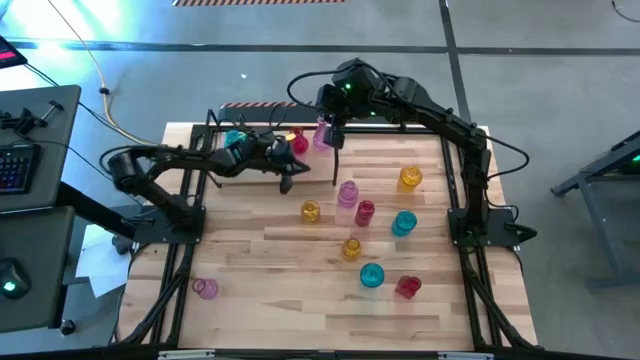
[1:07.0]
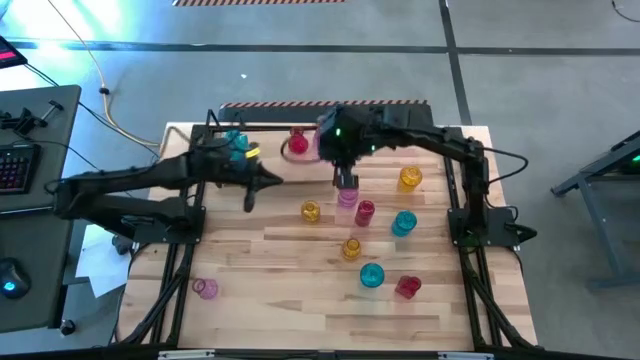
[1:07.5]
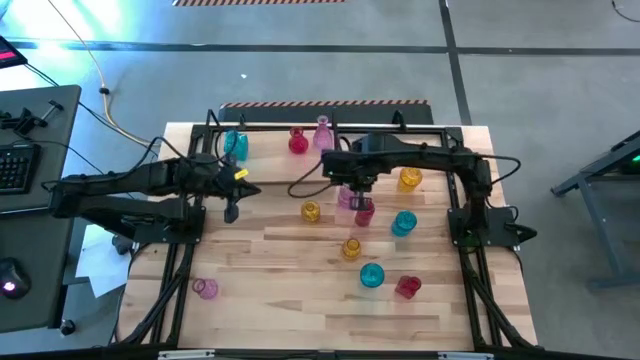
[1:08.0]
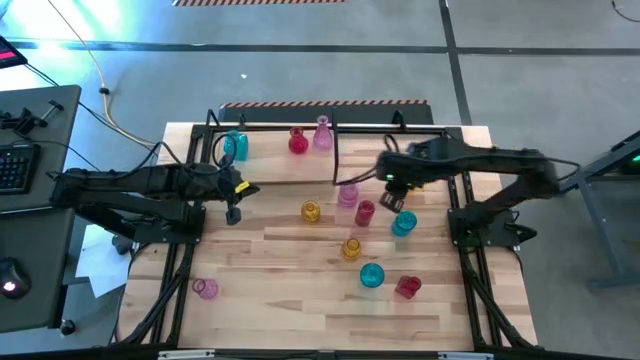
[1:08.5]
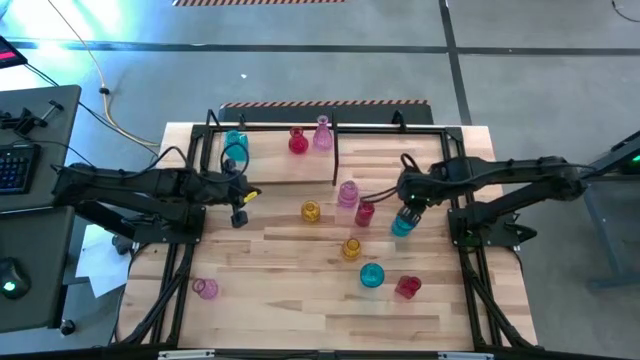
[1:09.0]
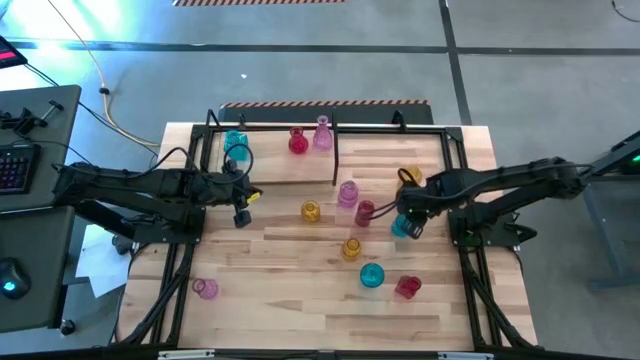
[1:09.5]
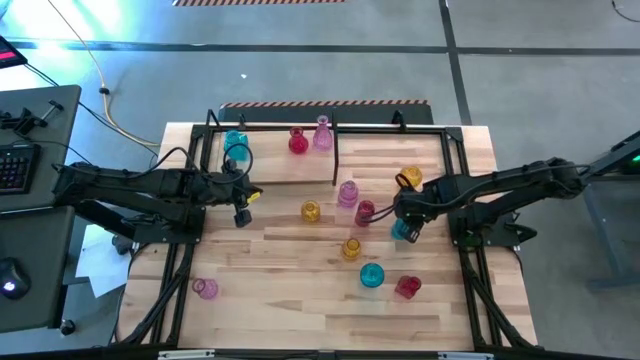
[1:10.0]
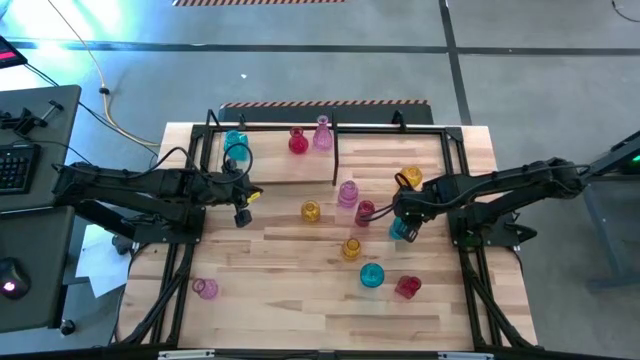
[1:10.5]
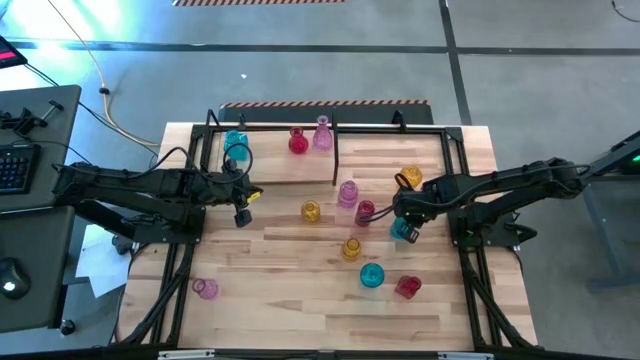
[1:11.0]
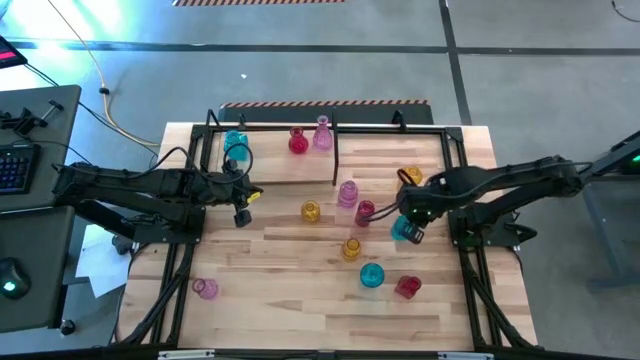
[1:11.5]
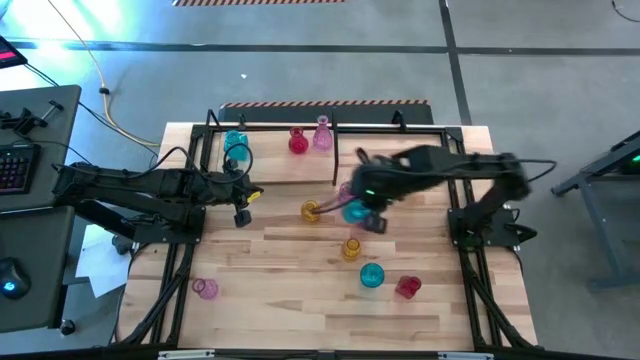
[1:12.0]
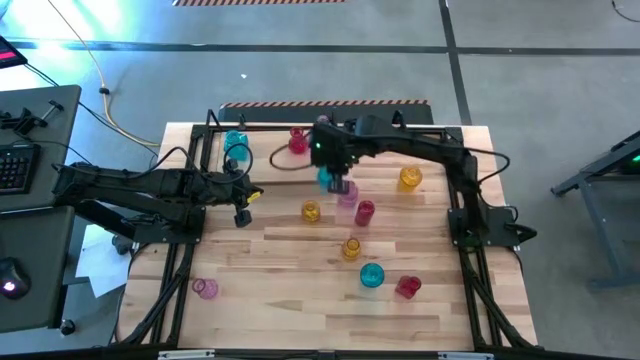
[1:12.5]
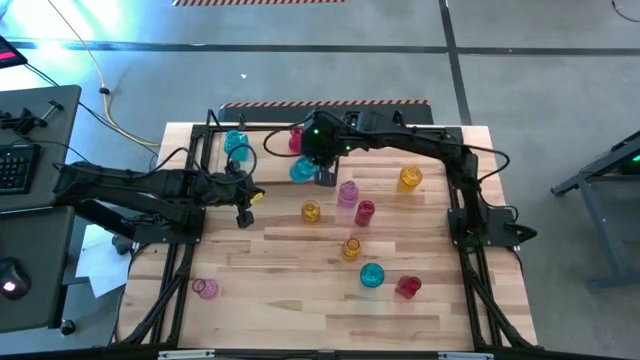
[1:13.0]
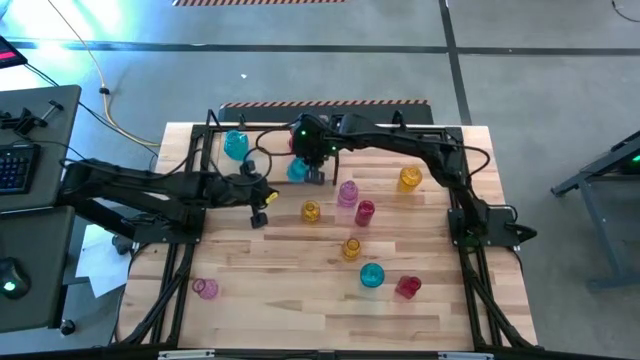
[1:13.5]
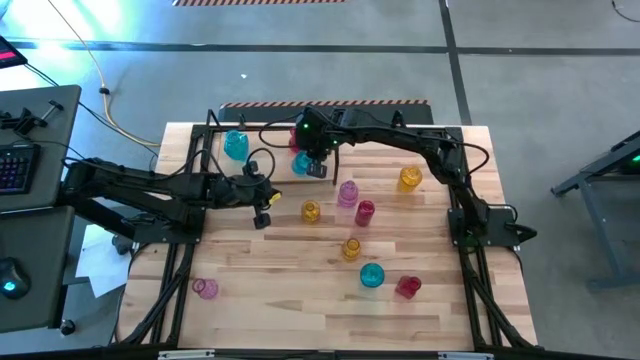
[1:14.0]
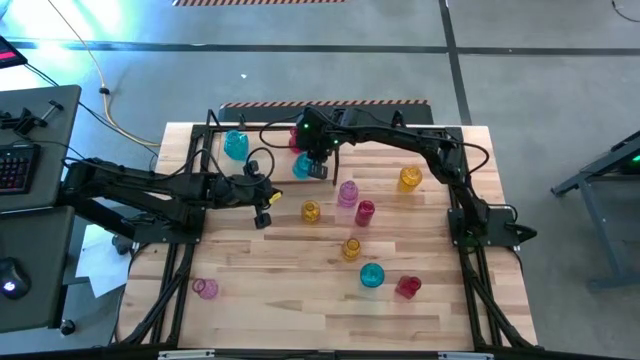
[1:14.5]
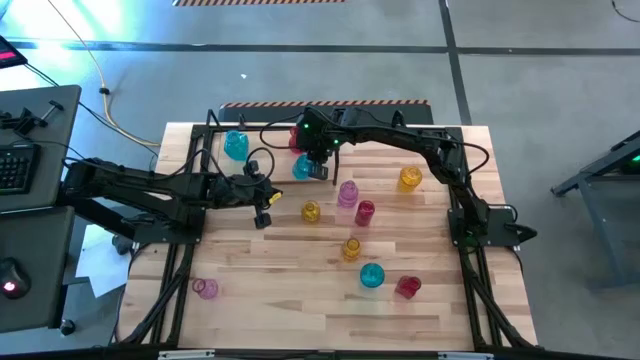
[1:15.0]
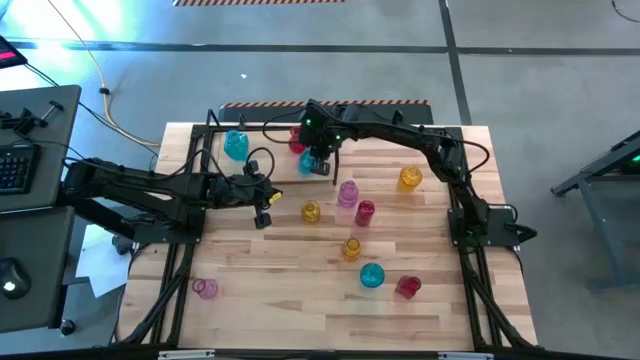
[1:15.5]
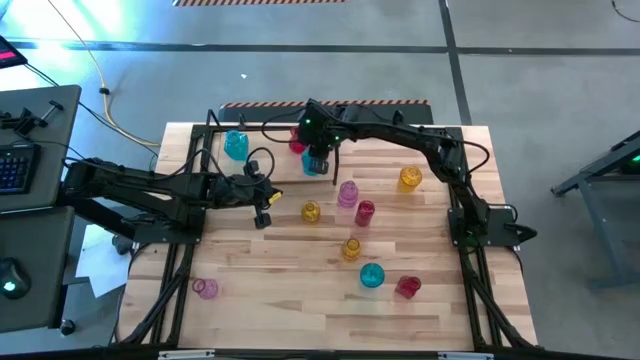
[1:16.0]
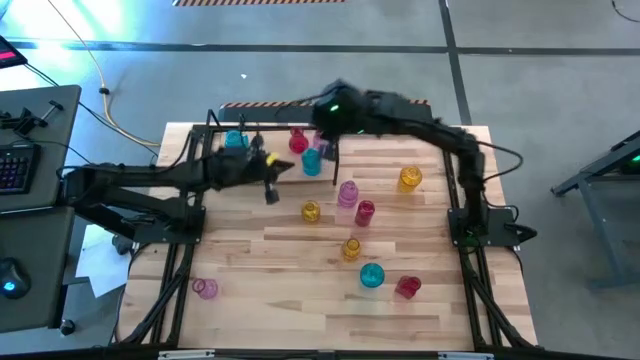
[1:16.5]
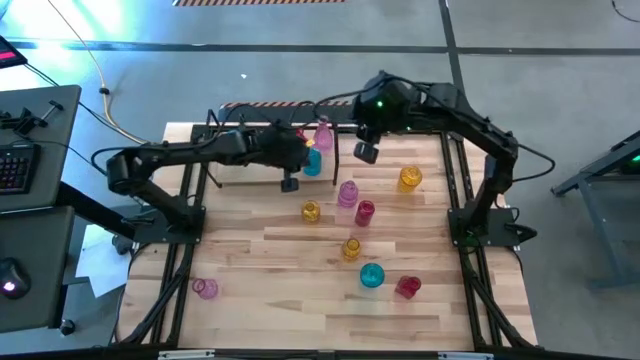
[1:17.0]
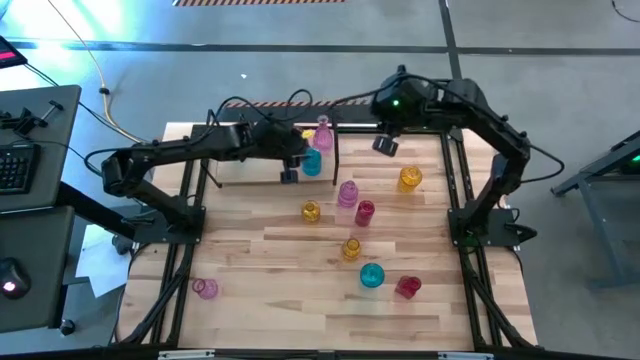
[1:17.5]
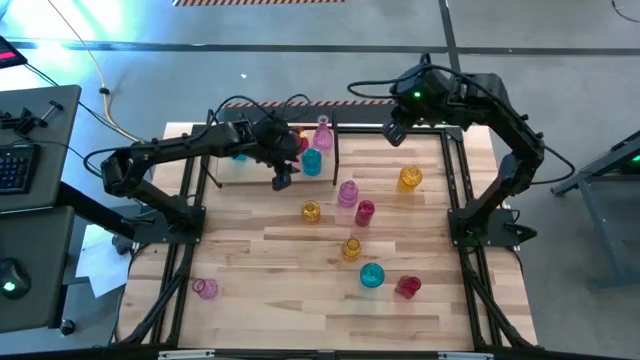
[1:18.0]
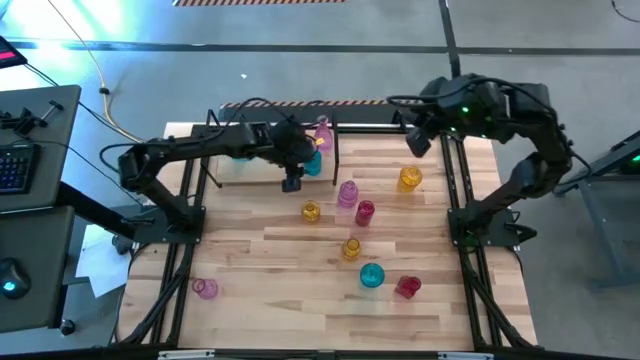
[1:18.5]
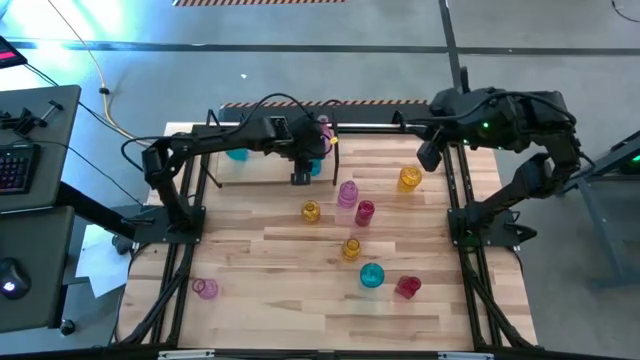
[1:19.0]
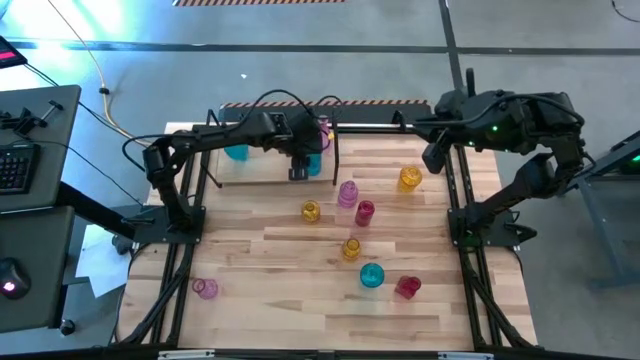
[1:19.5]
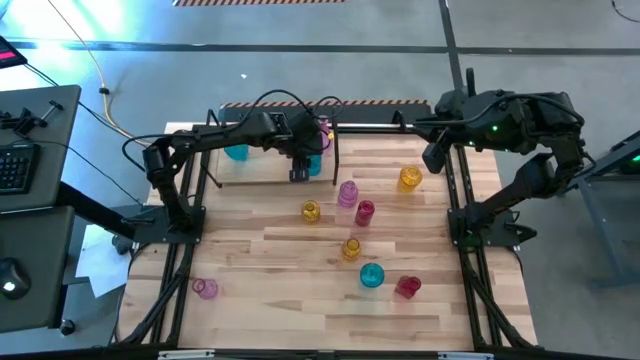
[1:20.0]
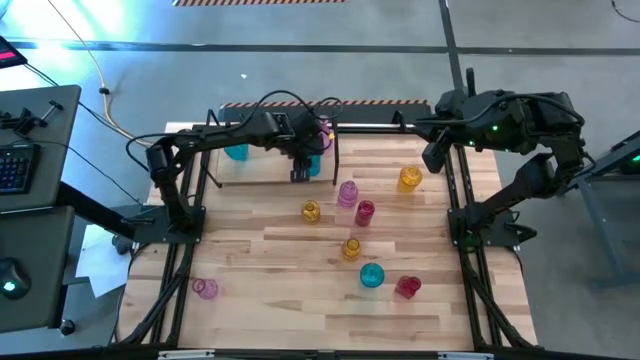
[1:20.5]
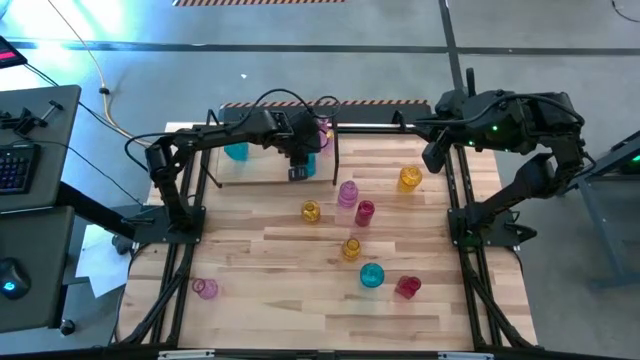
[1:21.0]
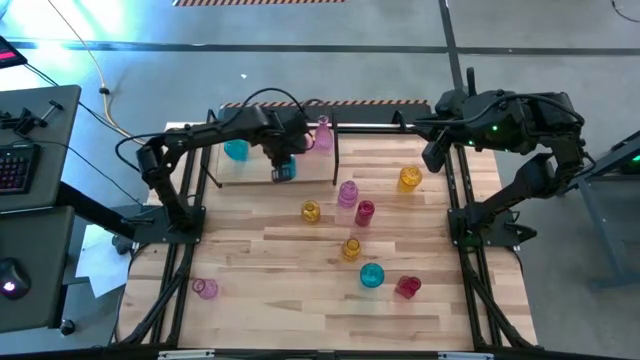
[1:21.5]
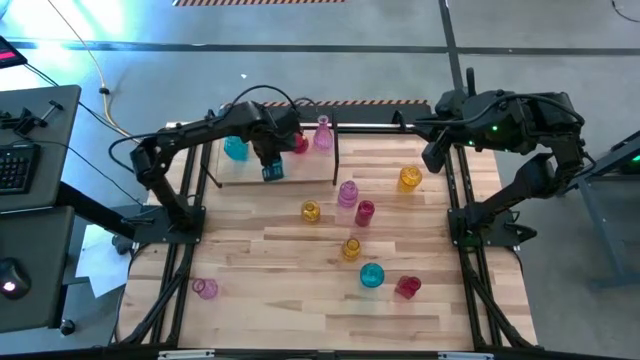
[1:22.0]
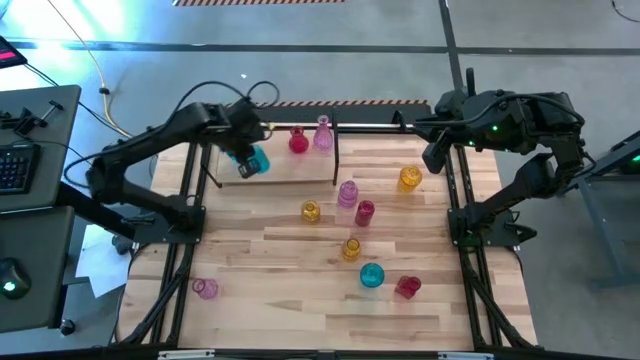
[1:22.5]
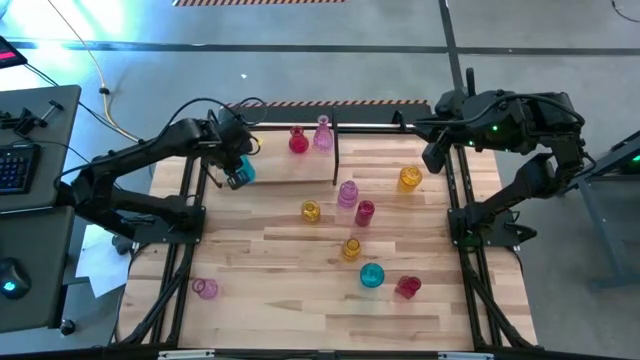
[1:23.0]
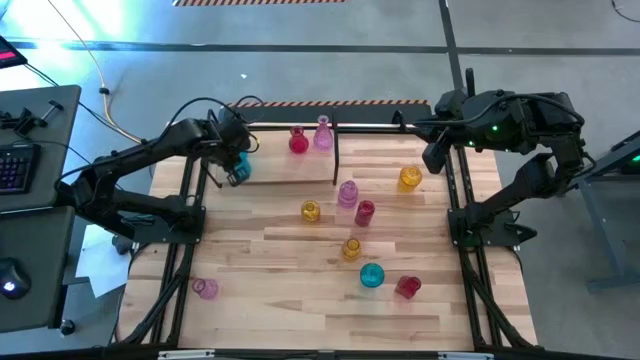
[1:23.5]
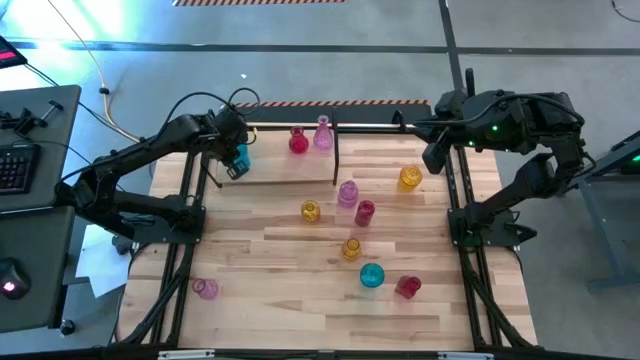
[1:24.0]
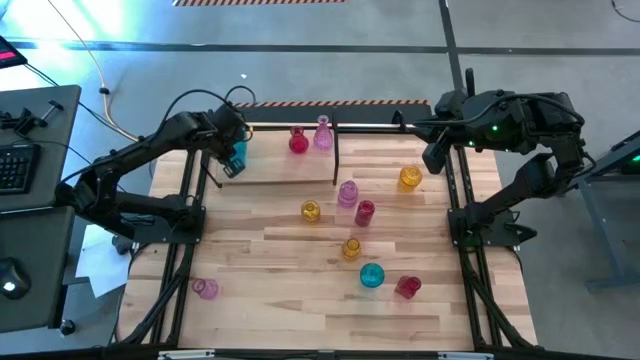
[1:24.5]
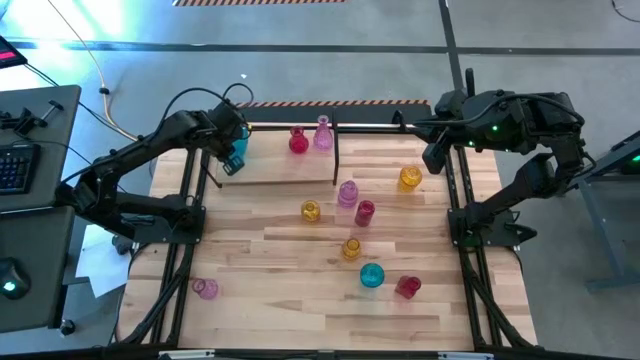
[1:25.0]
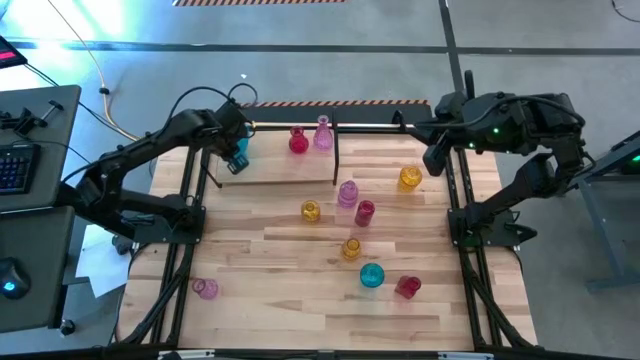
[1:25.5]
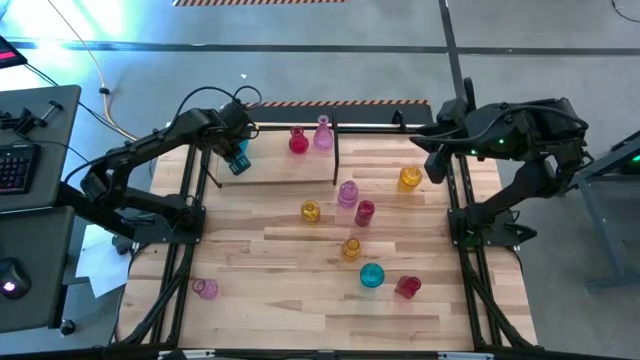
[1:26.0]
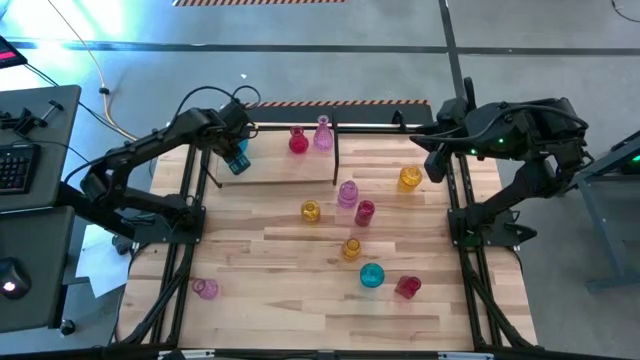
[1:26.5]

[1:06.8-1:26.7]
Task: sort vases onto shelf
Put the top blue vase on the shelf aligned with the other blue vase

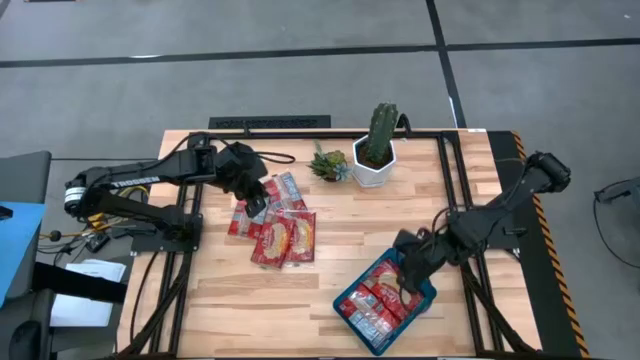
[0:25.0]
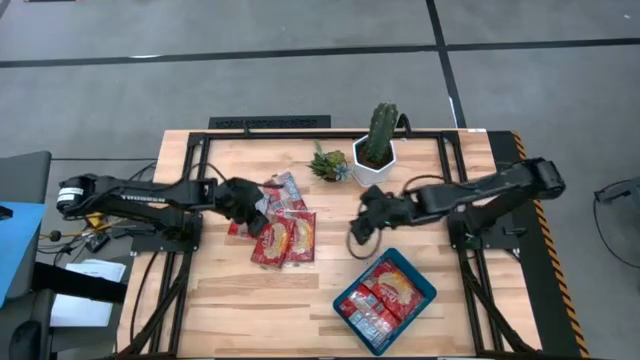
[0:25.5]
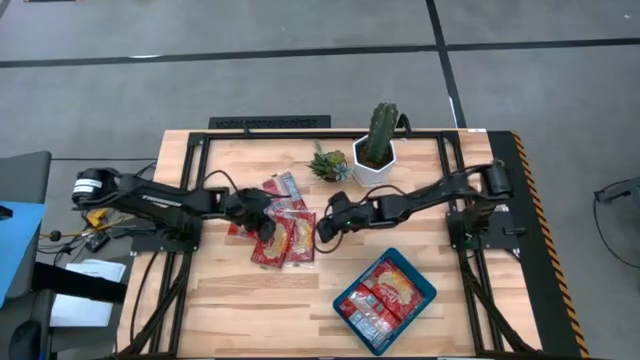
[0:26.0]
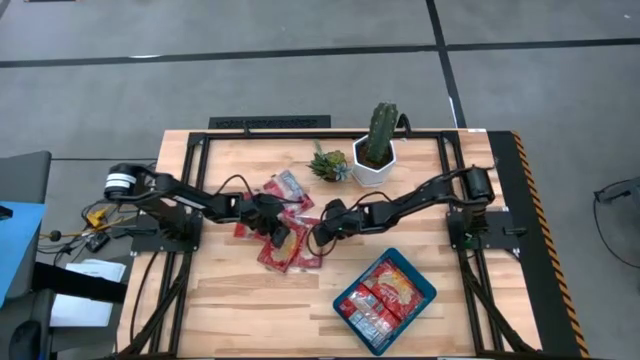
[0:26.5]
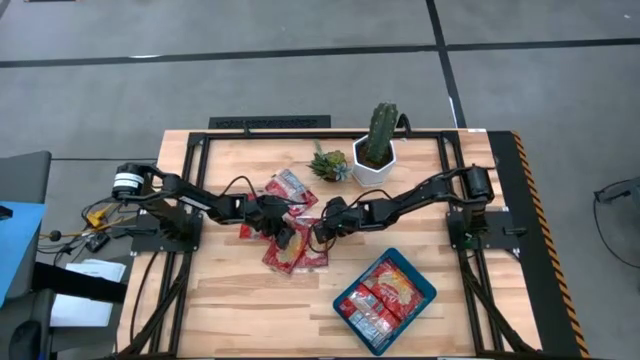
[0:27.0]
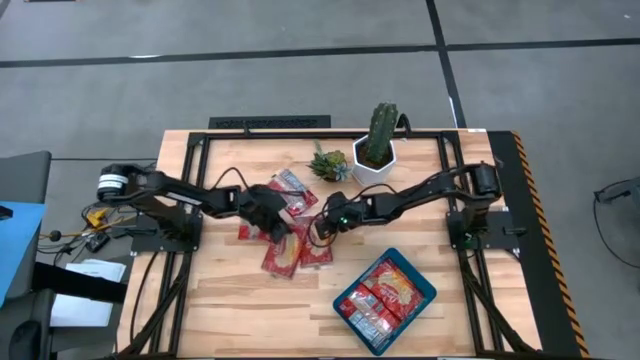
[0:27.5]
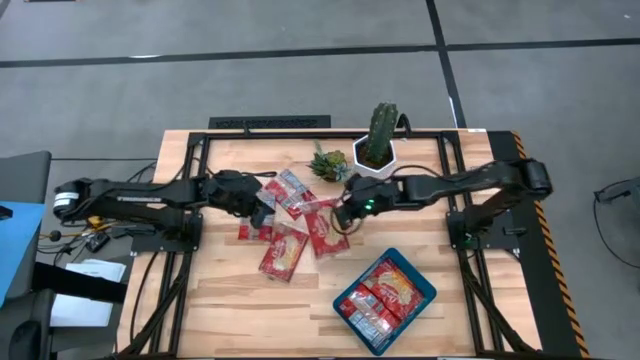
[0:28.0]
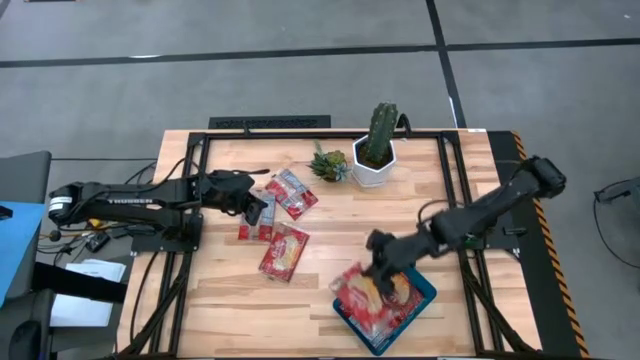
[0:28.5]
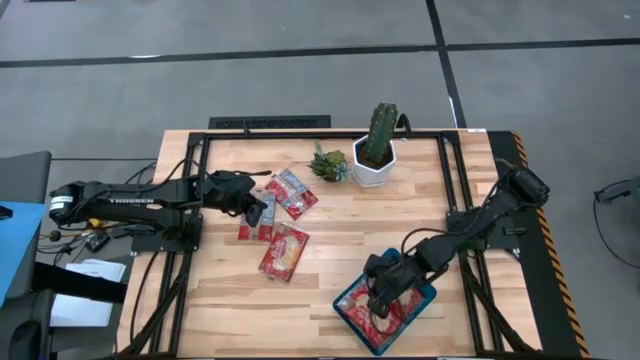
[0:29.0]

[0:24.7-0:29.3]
Task: Sort popcorn bags into baskets
Put the popcorn bag into the bin
